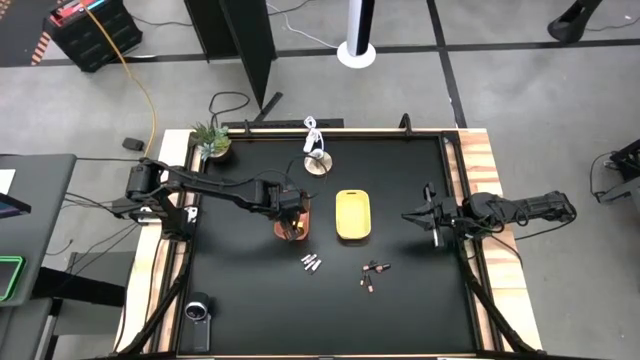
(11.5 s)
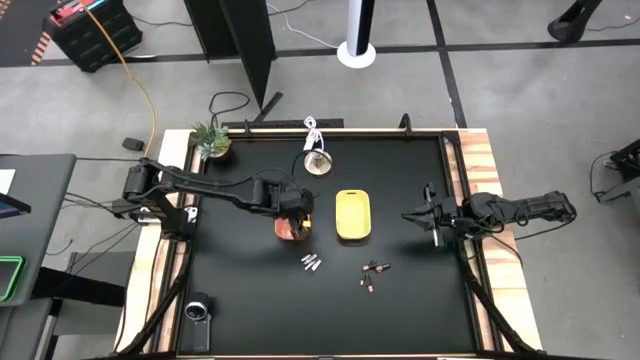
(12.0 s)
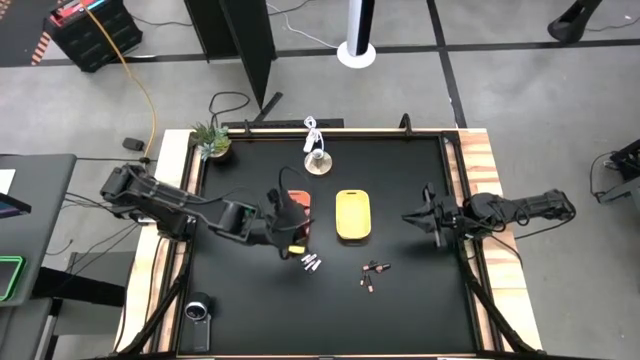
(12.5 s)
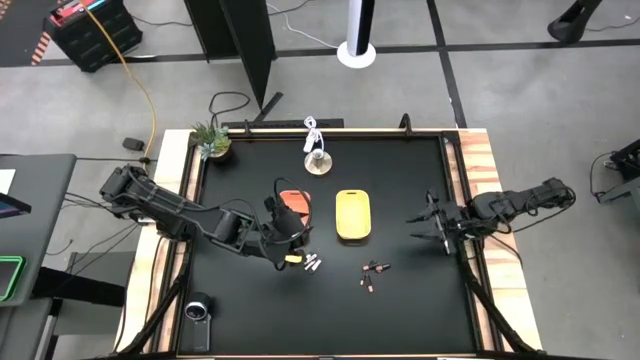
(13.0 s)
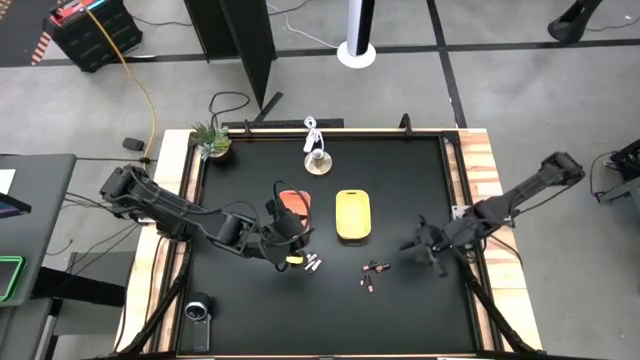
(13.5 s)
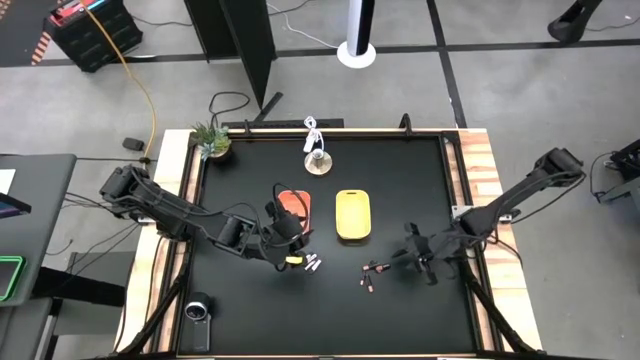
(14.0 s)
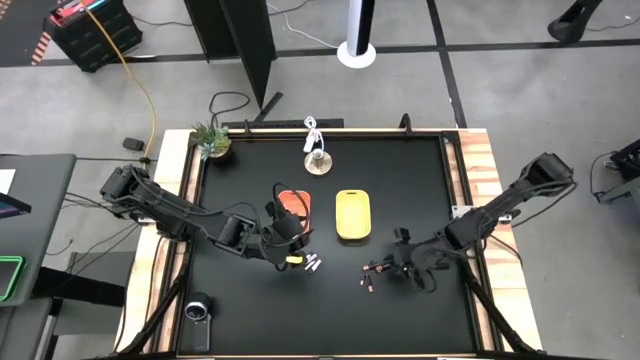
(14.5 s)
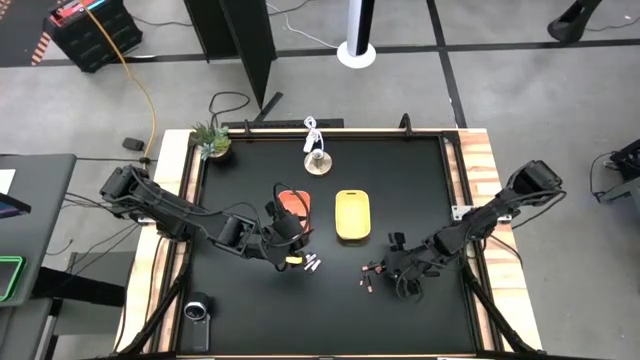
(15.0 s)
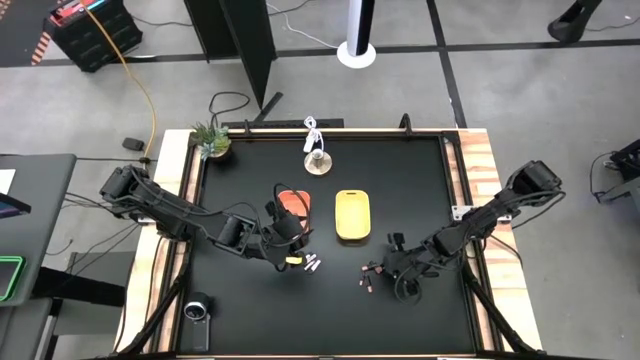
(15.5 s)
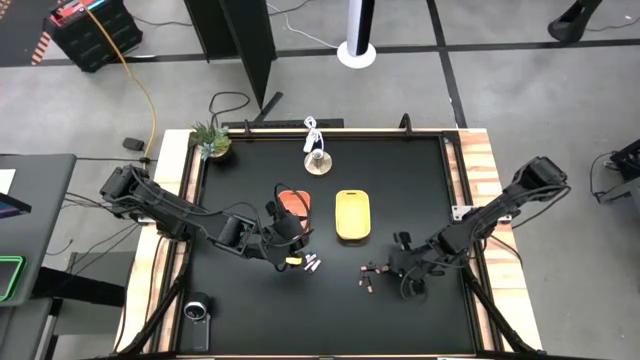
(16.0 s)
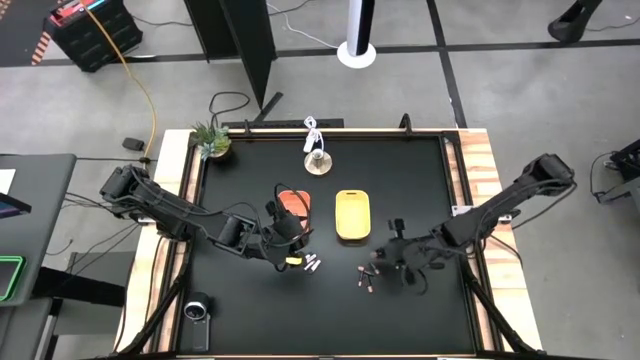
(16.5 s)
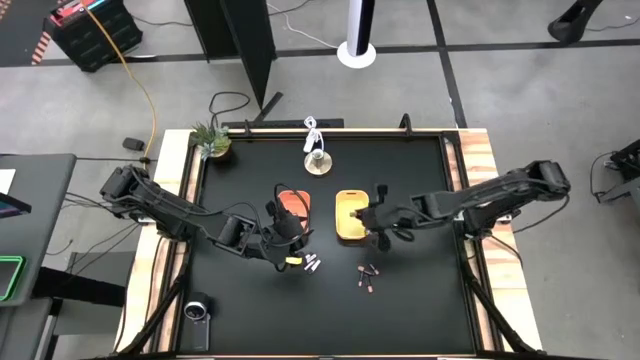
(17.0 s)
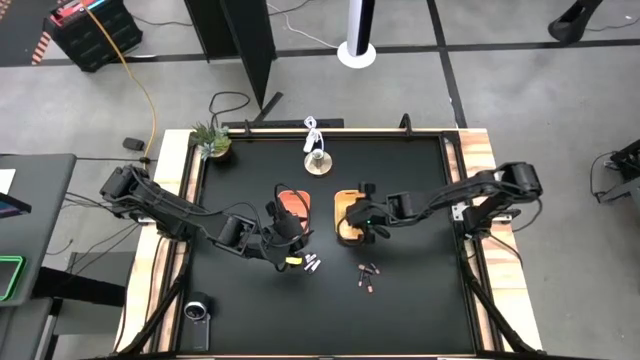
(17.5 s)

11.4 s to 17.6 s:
Task: Sort batteries
Put the black battery into the yellow bin

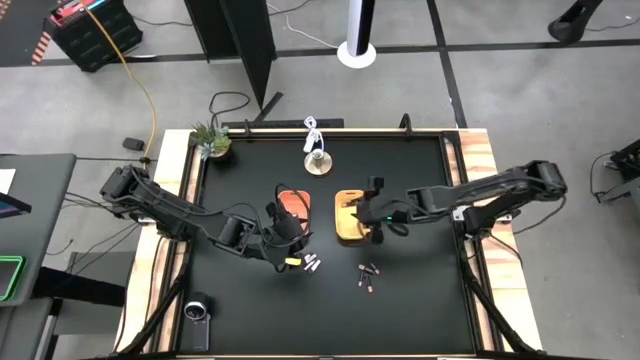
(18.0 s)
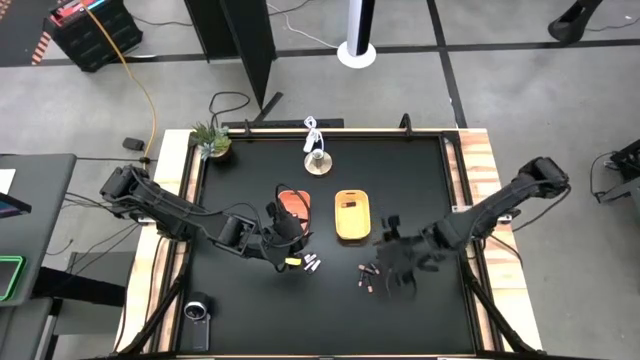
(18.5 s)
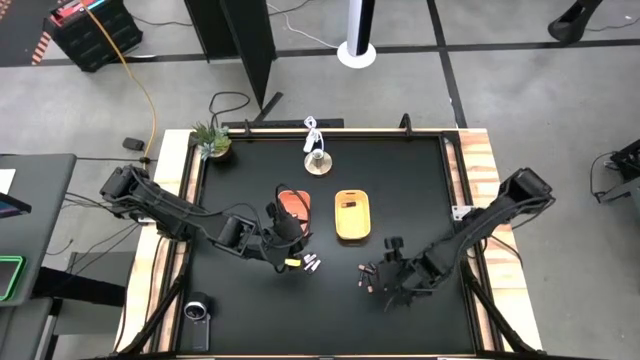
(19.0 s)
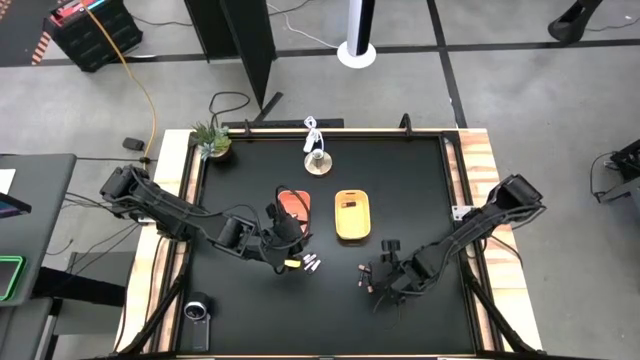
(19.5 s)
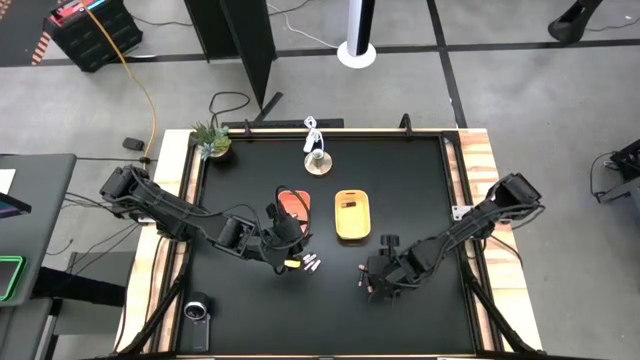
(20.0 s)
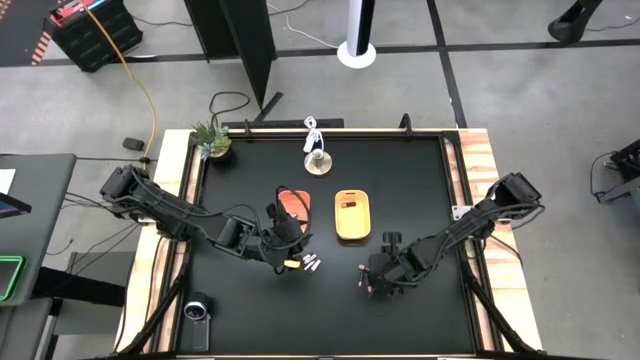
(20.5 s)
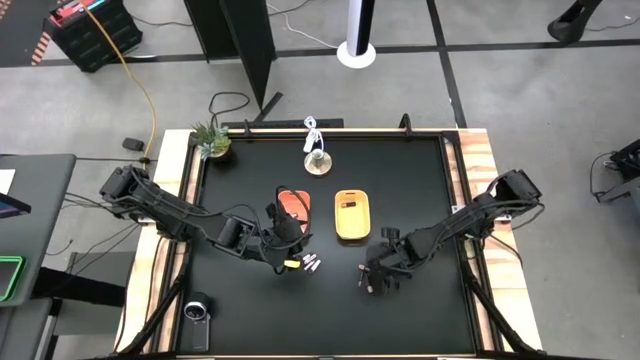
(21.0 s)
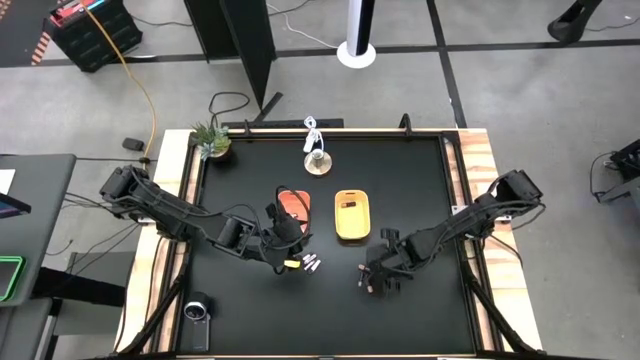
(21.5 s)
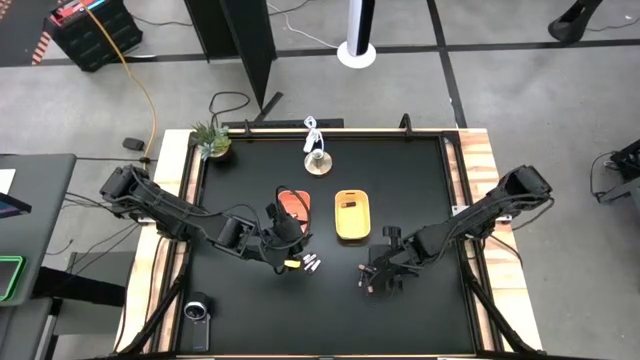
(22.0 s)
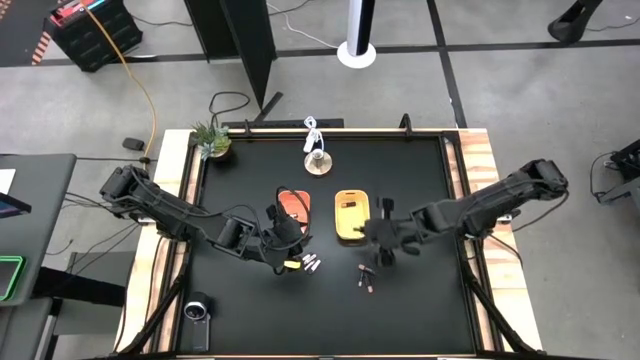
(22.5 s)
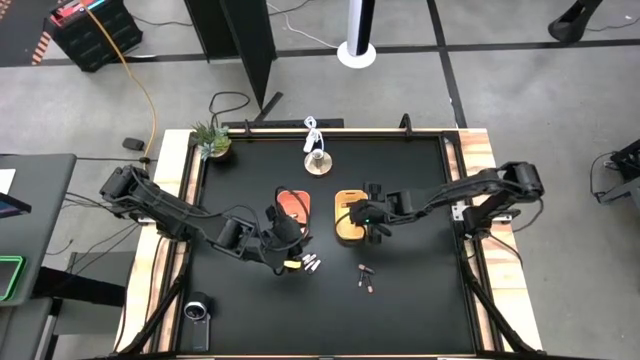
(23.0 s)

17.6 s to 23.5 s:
Put the black battery into the yellow bin

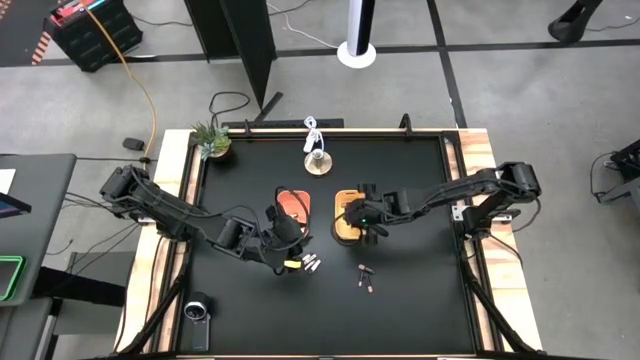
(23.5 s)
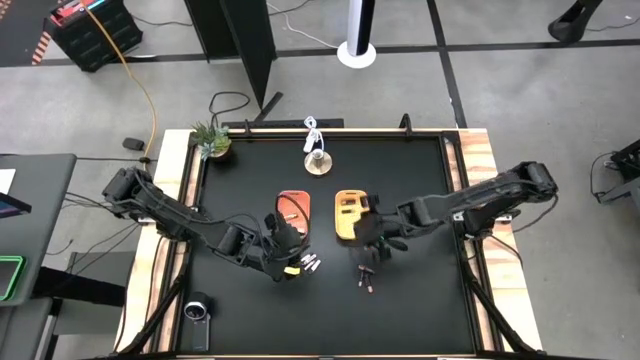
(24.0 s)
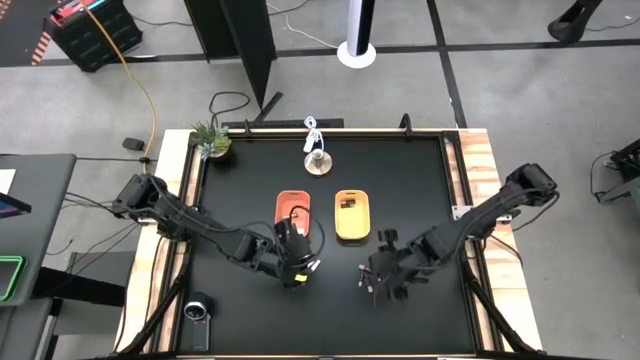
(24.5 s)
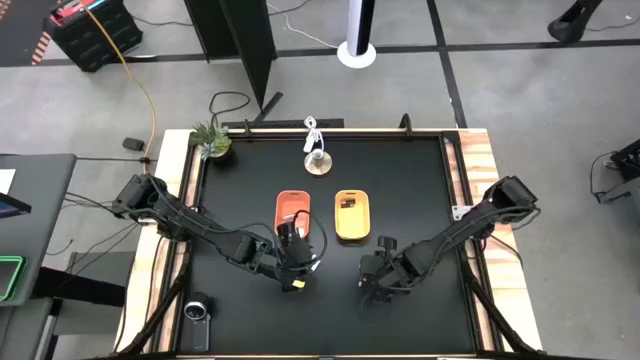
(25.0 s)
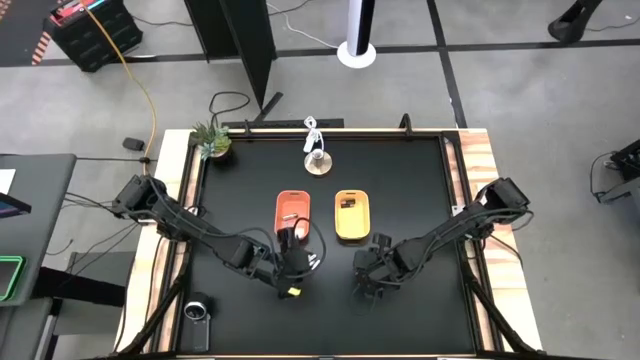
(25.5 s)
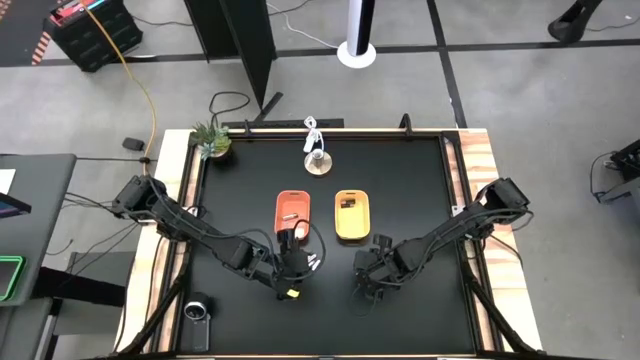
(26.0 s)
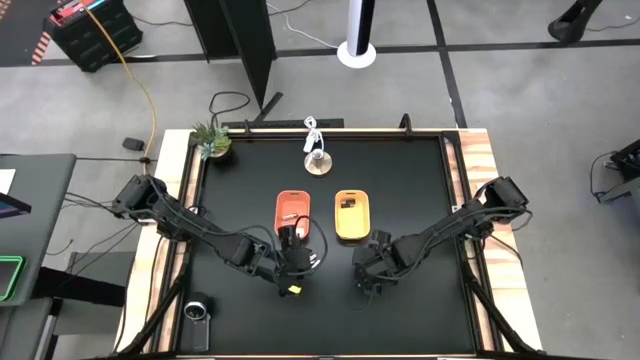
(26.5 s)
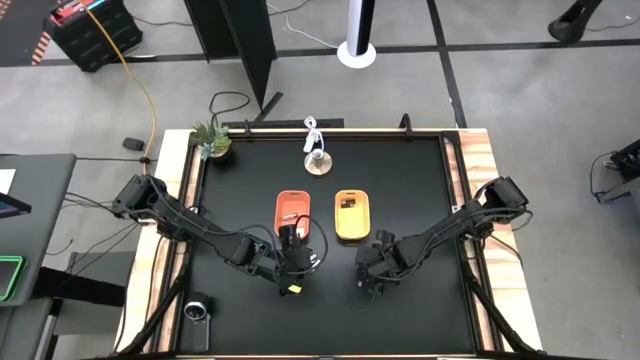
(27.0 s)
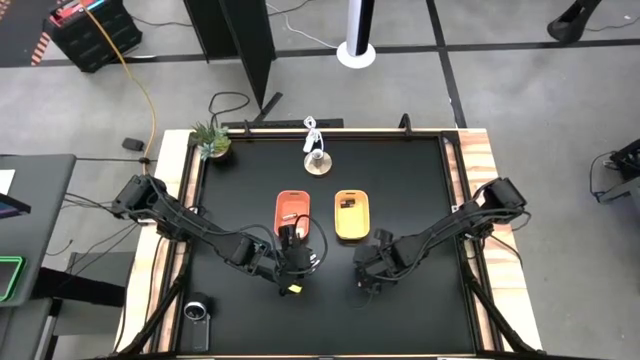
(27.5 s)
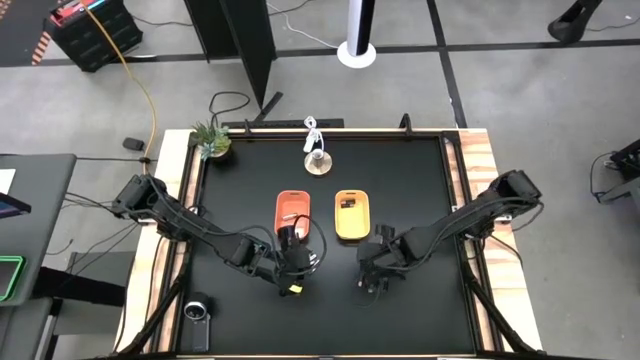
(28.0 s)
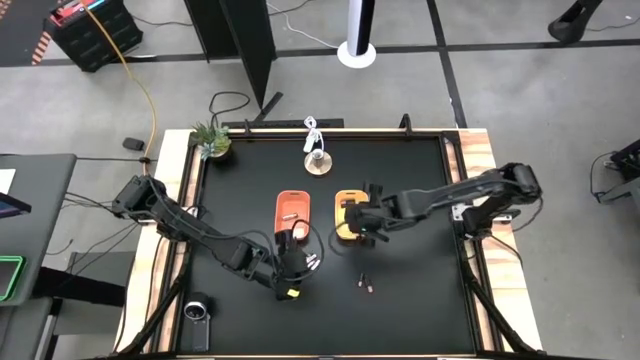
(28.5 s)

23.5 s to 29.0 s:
Put the black battery into the yellow bin

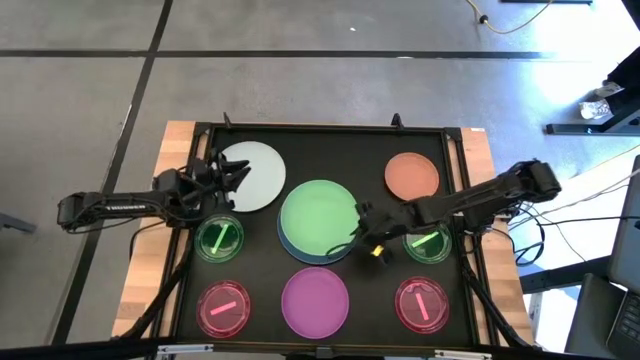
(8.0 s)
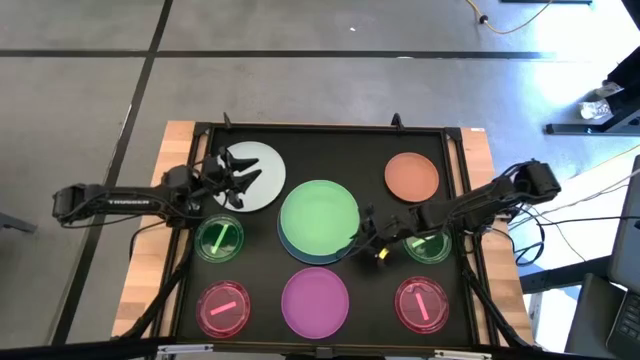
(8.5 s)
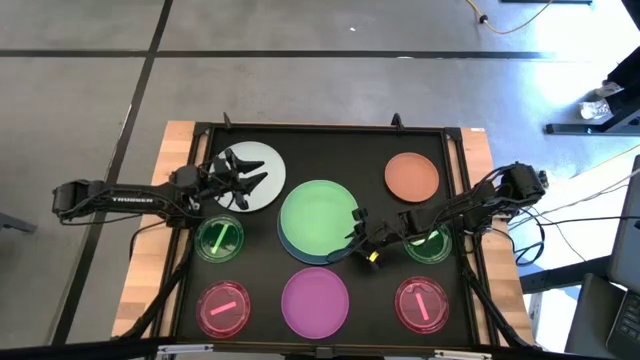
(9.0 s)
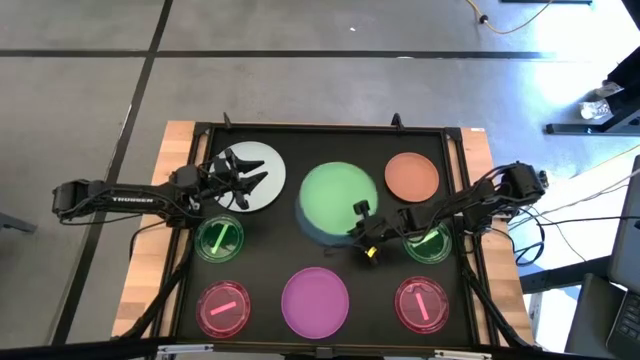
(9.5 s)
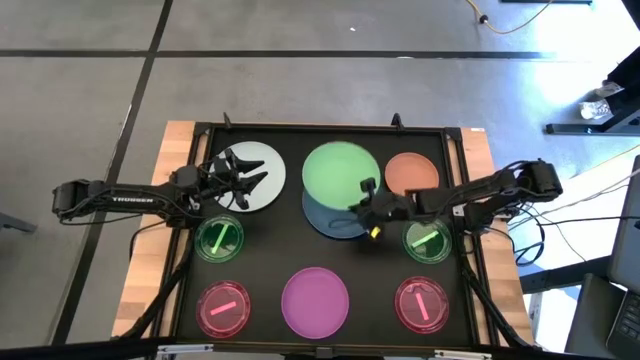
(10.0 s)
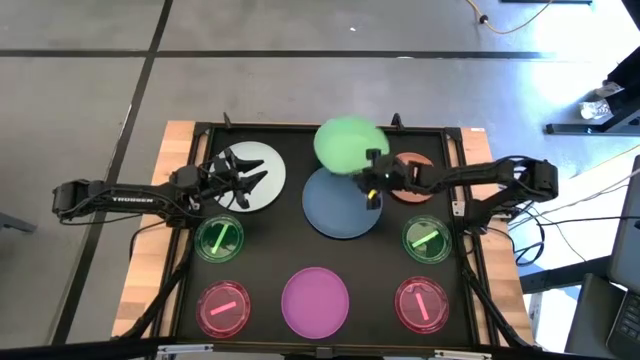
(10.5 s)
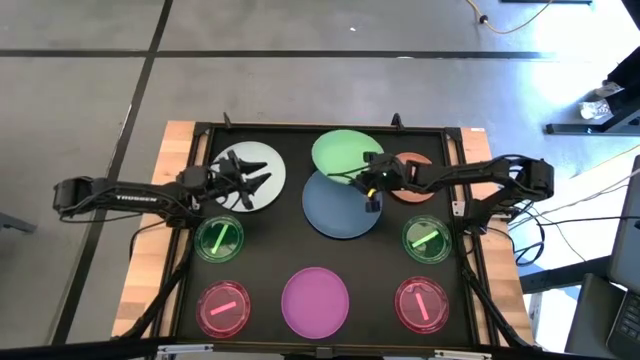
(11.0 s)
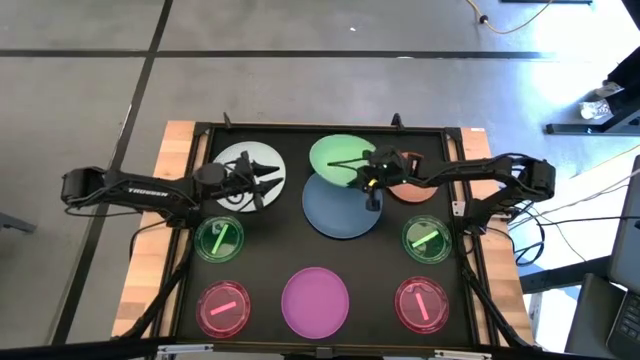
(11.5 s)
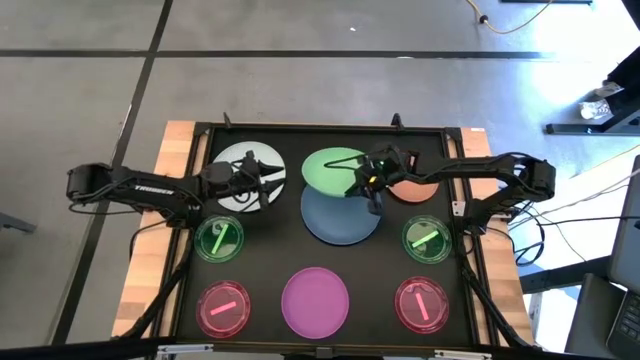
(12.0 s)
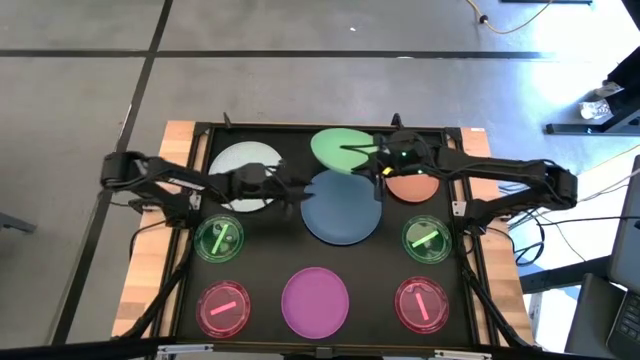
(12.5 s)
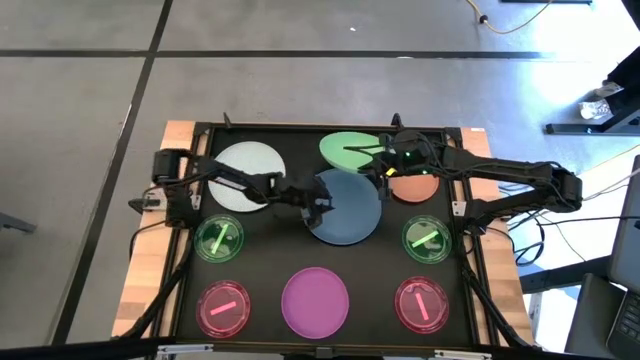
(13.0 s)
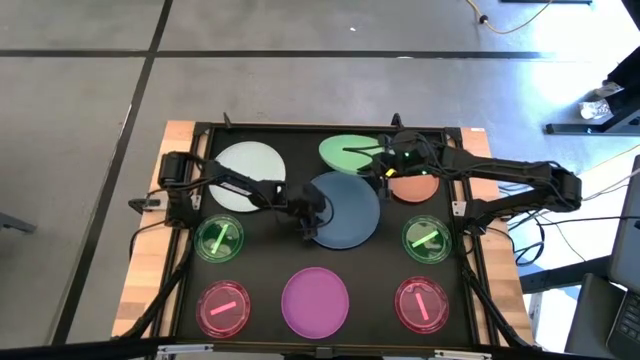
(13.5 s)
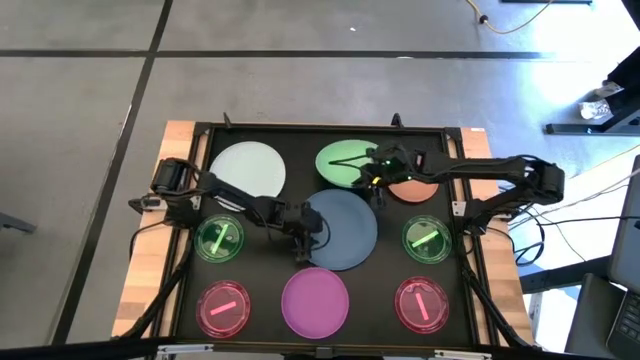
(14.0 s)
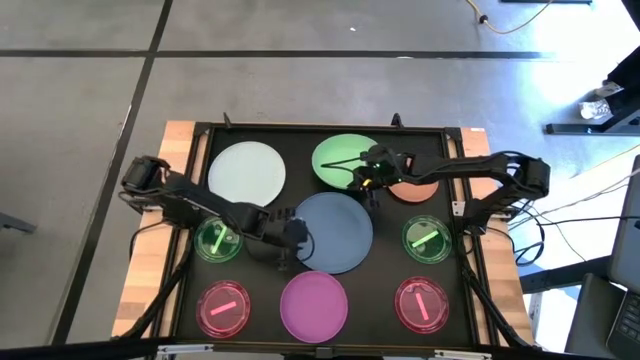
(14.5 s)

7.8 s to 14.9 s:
Task: Stack plastic plates
Remove the green plate from the blue plate
